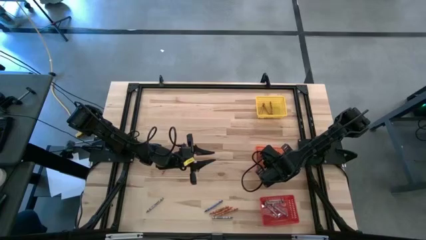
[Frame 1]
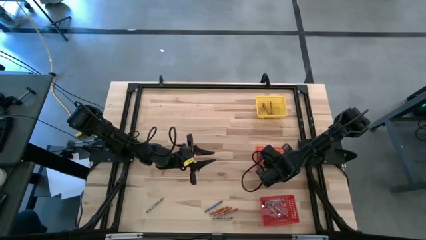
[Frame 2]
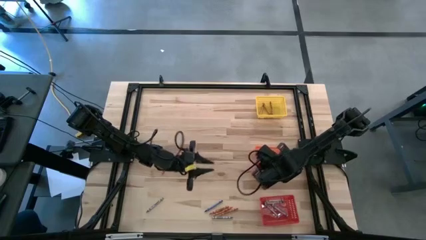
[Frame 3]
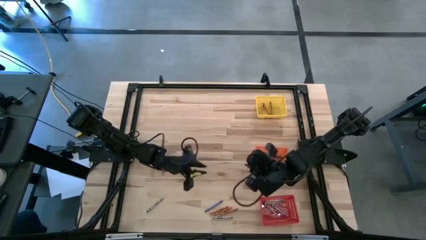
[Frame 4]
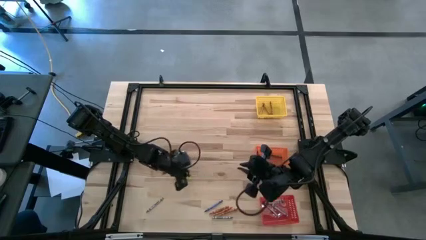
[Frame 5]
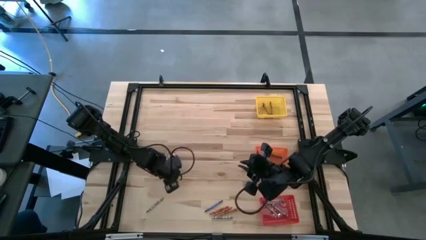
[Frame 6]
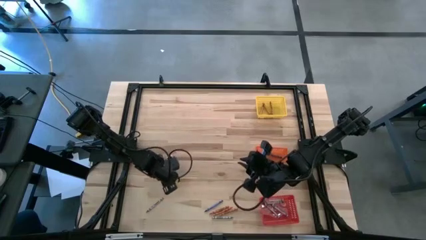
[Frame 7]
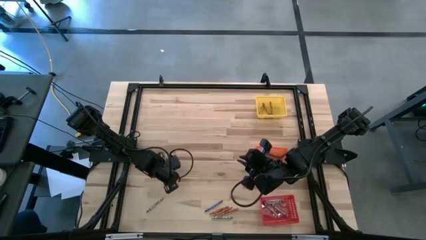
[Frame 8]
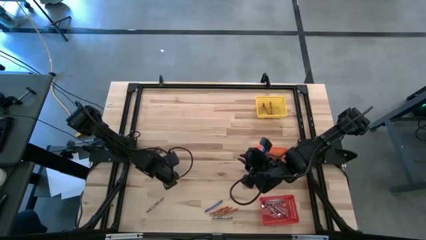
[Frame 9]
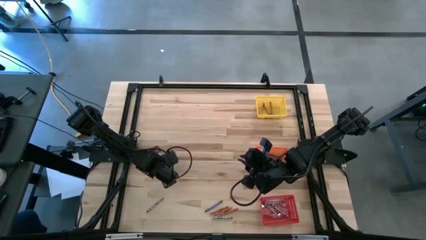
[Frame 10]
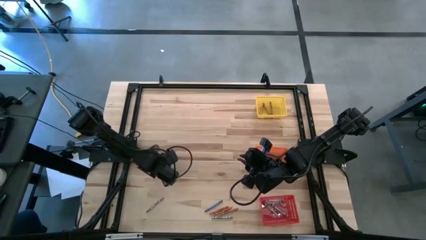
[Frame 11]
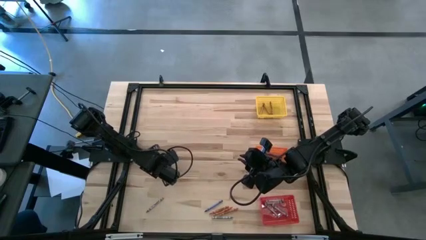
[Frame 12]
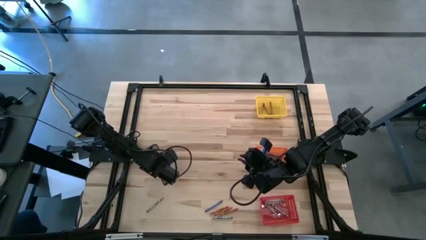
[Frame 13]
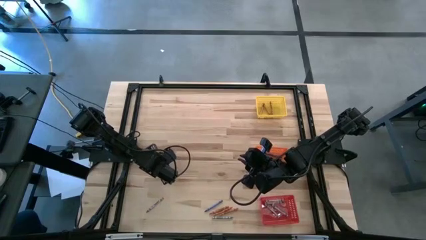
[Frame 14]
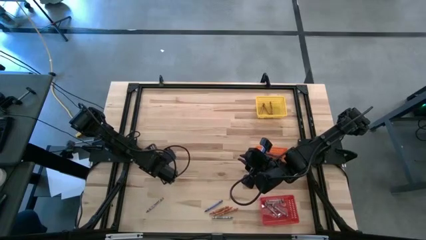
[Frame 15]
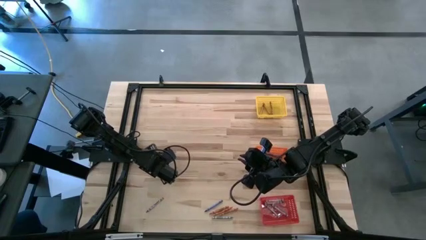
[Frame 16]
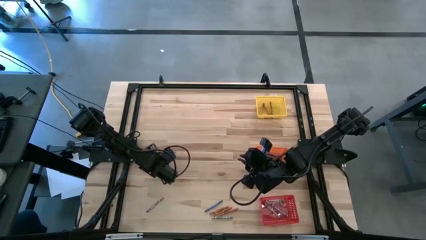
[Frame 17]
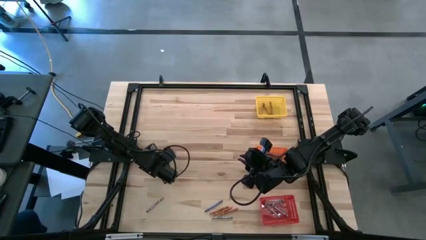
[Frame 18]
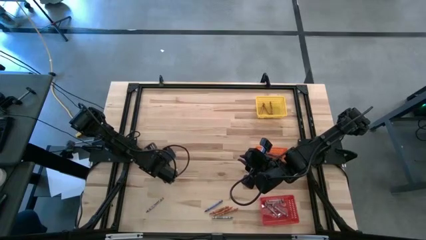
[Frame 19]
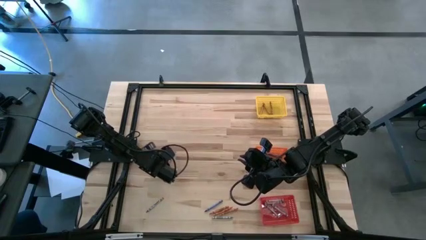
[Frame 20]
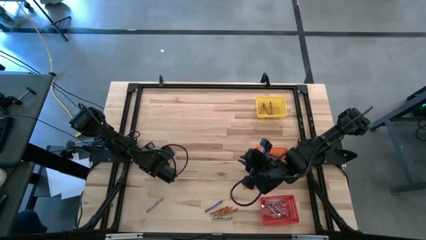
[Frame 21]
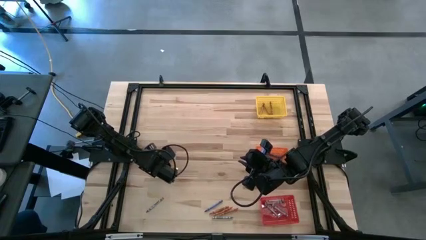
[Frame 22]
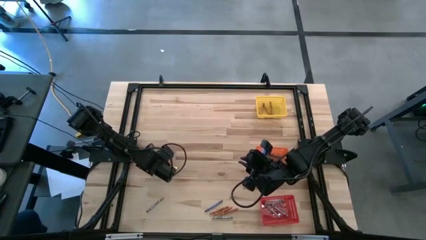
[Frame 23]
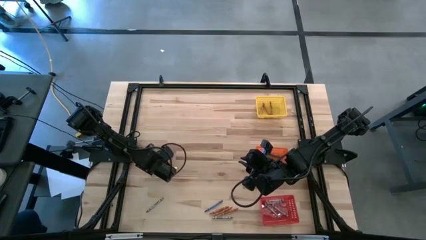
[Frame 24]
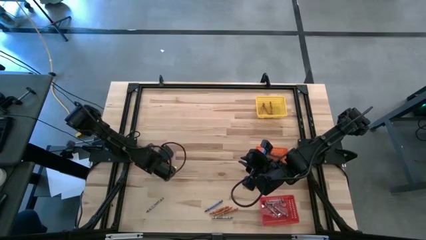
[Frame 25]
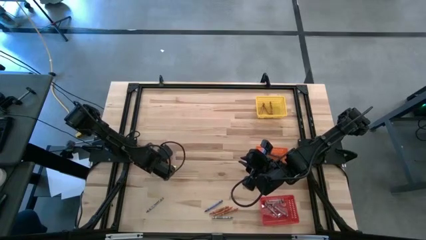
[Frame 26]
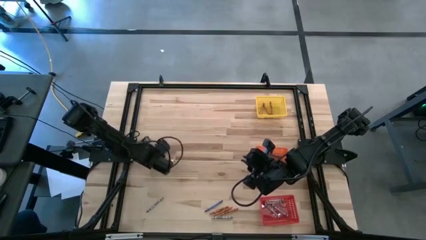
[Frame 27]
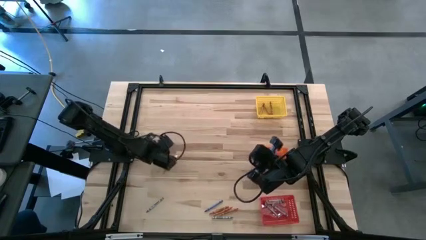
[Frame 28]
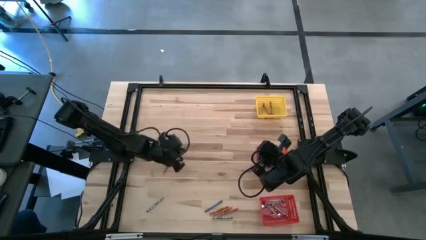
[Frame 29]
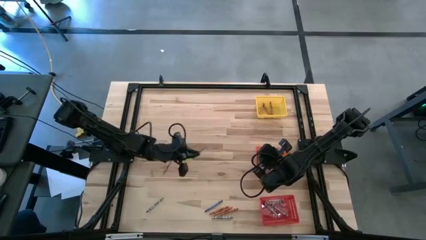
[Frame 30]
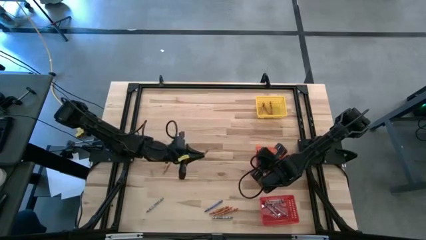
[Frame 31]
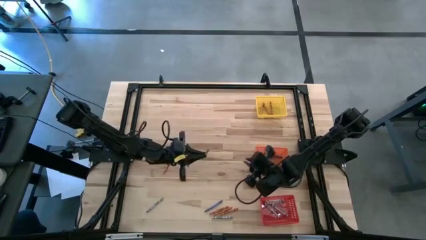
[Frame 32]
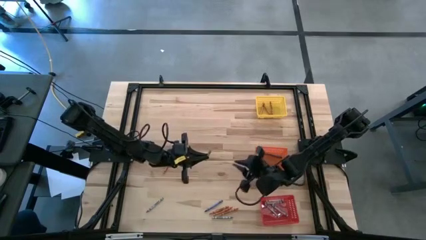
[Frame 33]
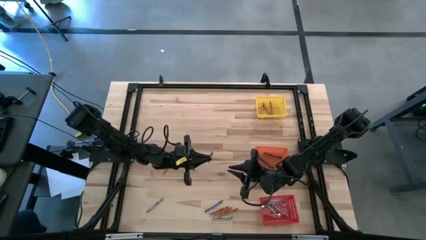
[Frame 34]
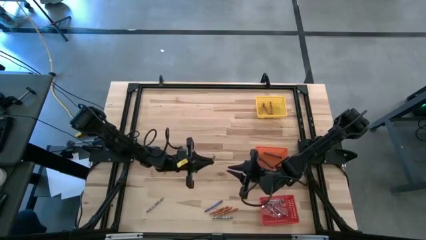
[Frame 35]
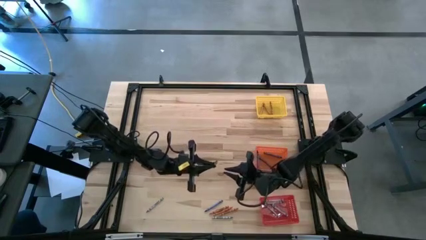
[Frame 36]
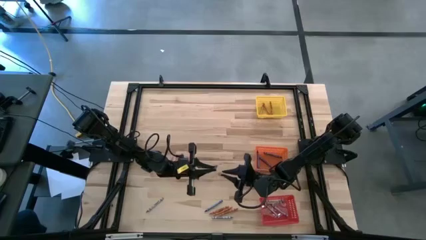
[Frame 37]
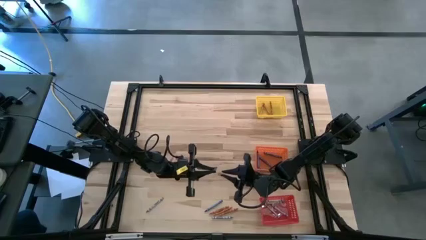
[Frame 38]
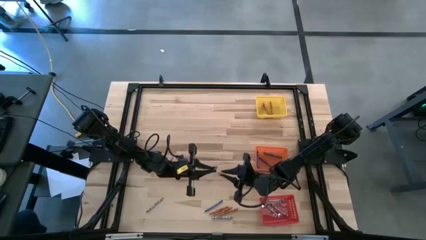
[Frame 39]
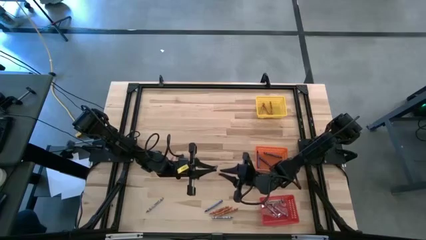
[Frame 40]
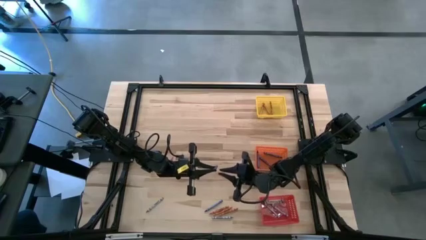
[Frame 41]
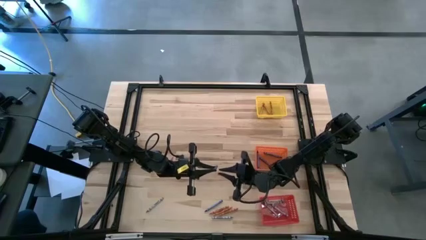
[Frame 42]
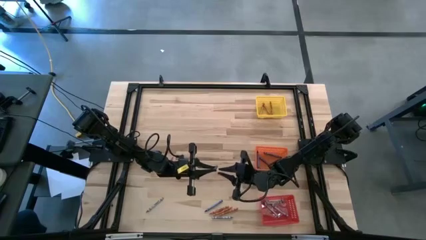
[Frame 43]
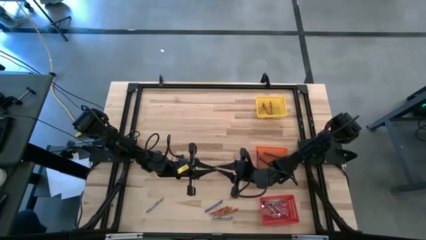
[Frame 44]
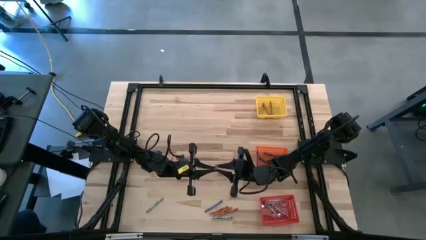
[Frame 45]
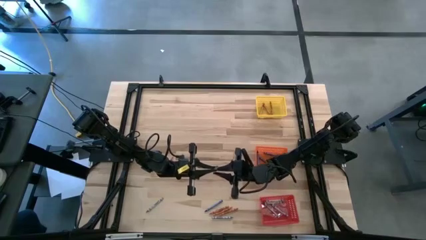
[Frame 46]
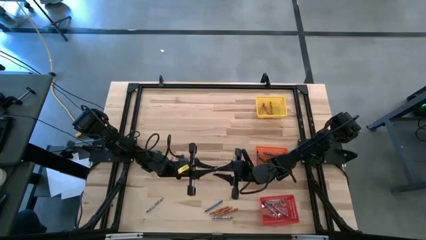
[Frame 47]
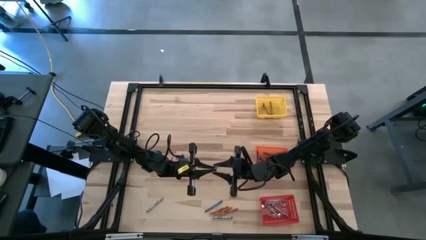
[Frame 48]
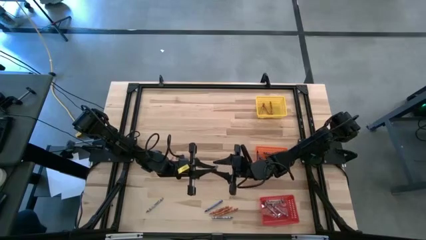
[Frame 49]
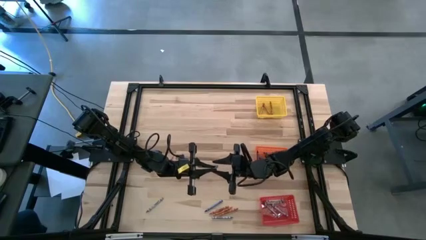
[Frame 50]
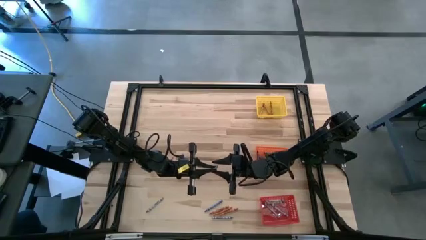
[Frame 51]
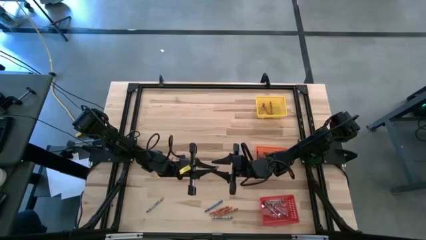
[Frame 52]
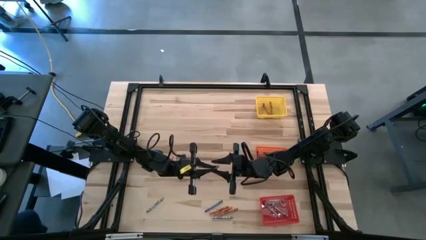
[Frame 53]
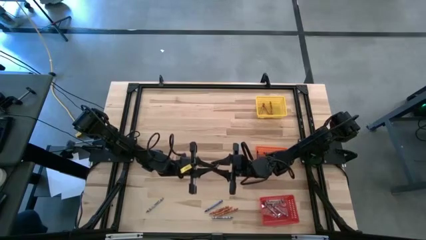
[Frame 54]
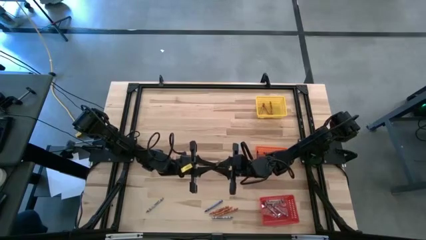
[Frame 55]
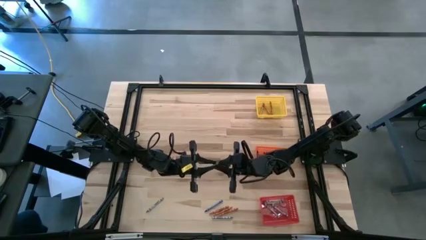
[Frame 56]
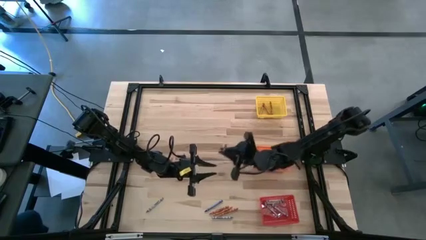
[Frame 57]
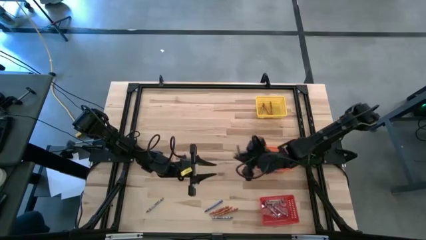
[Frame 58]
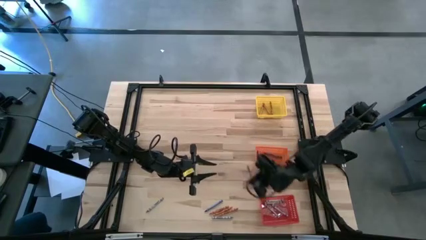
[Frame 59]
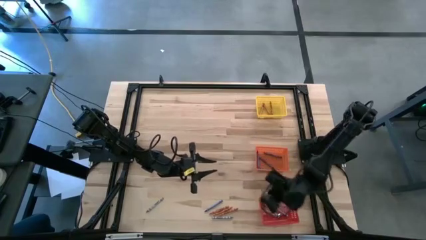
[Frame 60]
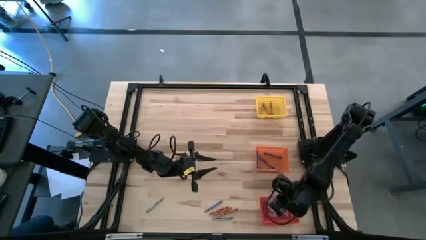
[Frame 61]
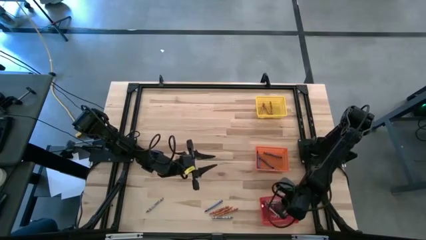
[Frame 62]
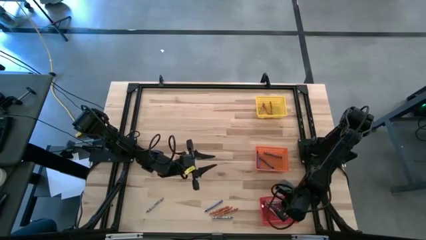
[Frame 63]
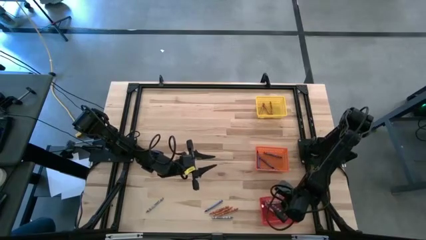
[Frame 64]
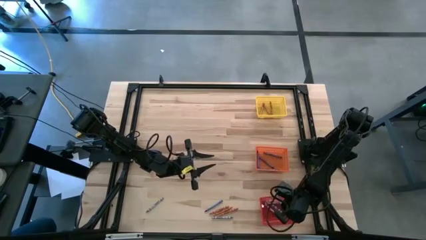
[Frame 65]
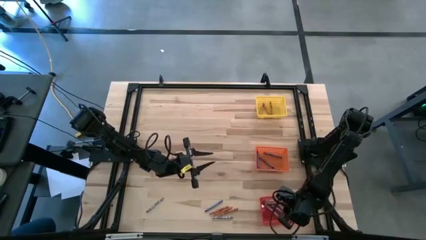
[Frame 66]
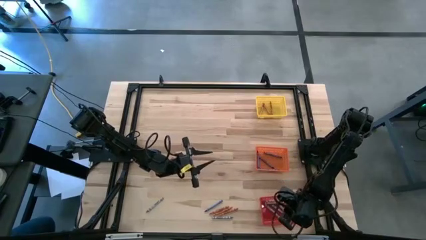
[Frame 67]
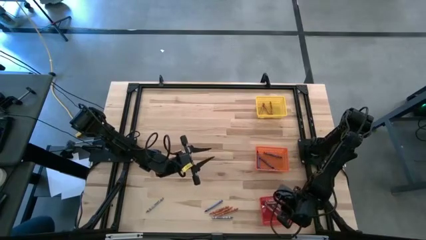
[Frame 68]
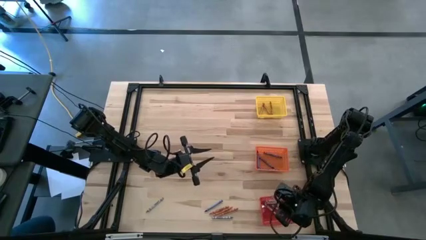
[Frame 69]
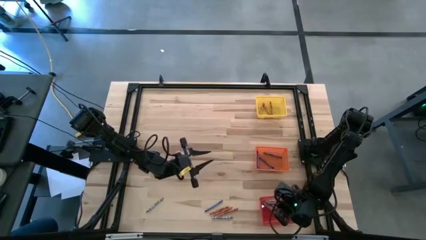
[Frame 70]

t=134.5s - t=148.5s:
Task: Sort crayons
Put the gray crayon into the red bin
